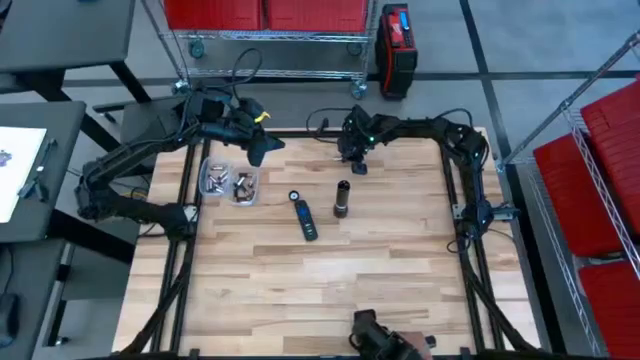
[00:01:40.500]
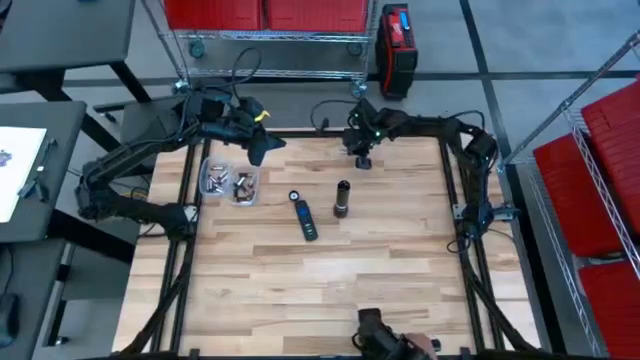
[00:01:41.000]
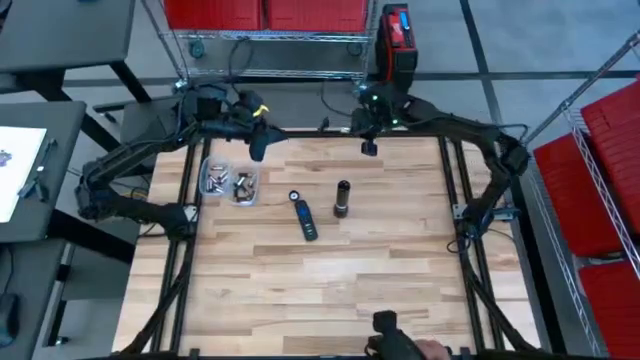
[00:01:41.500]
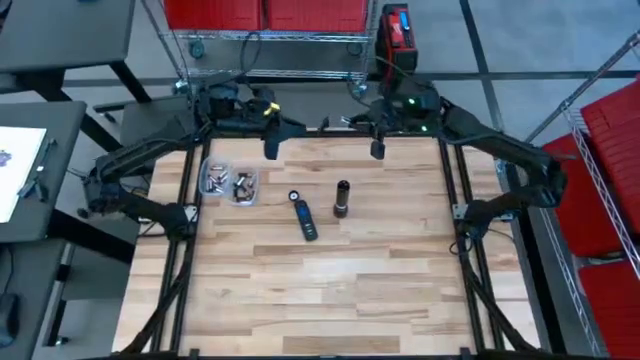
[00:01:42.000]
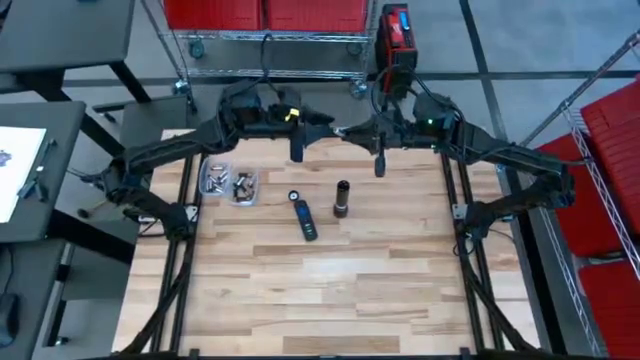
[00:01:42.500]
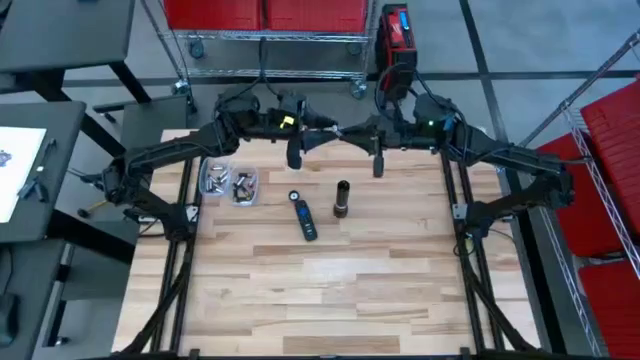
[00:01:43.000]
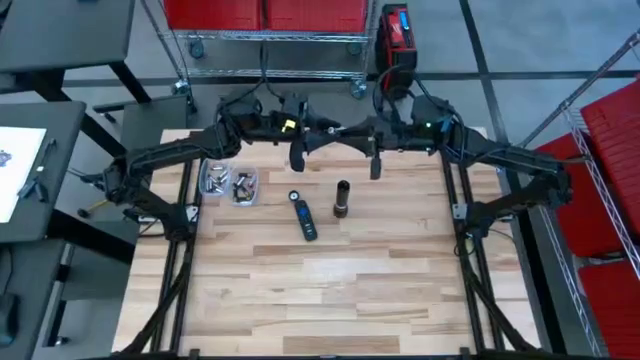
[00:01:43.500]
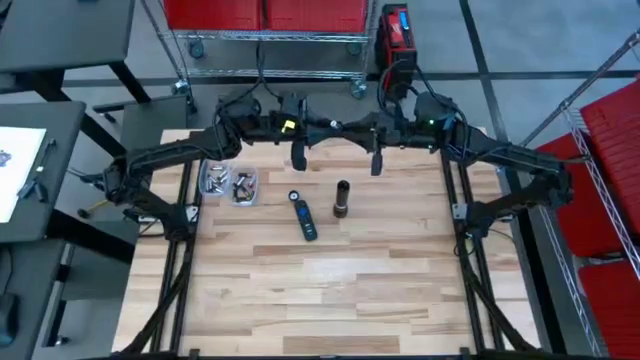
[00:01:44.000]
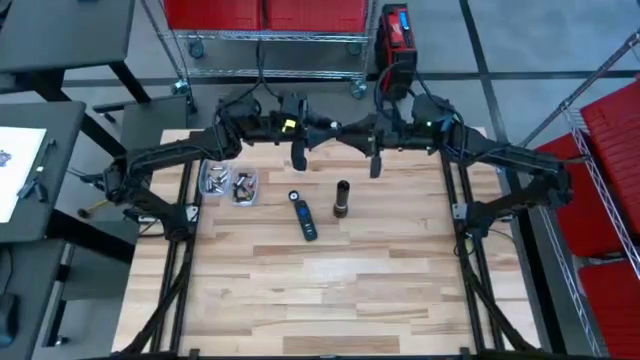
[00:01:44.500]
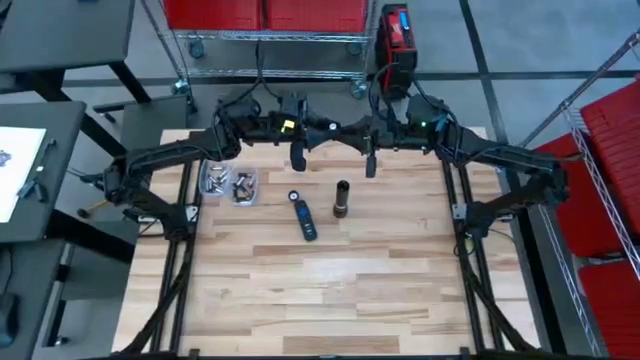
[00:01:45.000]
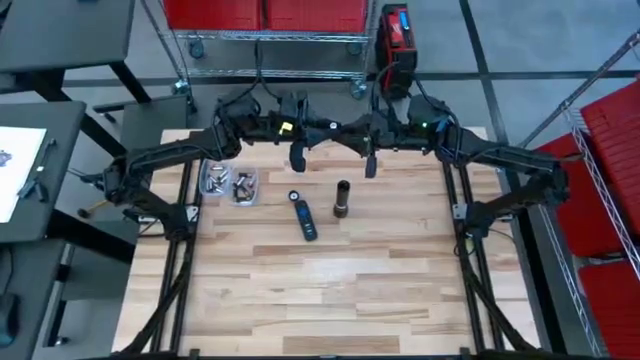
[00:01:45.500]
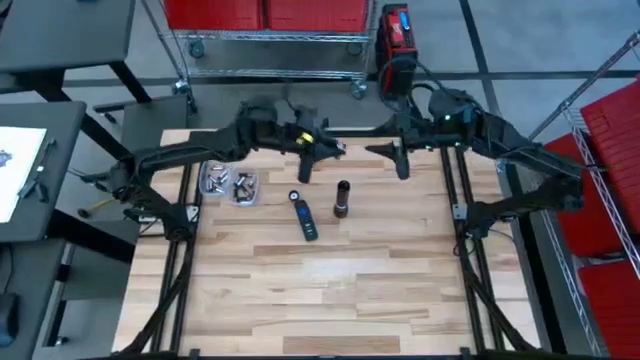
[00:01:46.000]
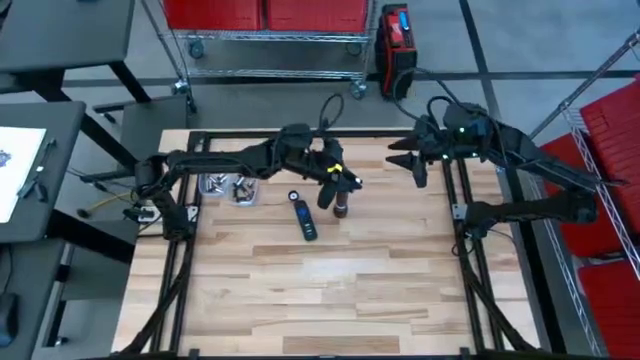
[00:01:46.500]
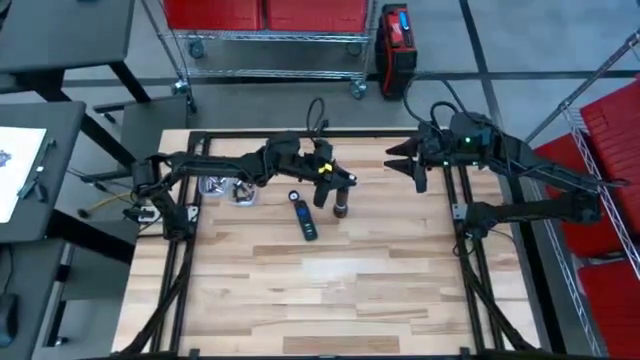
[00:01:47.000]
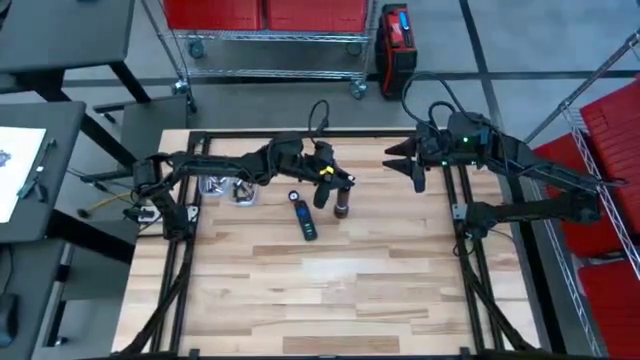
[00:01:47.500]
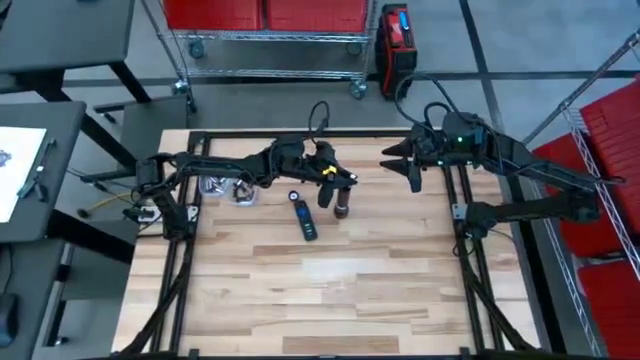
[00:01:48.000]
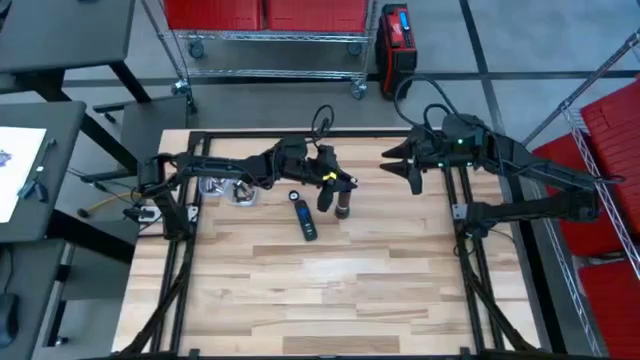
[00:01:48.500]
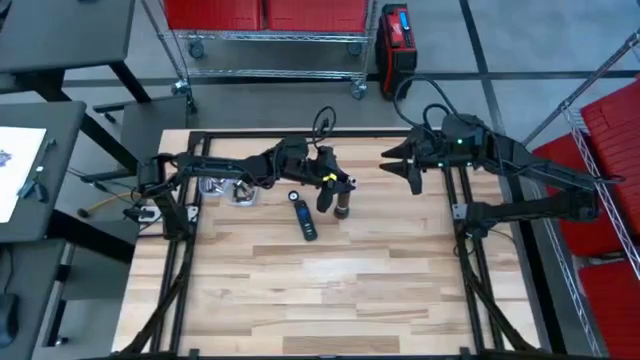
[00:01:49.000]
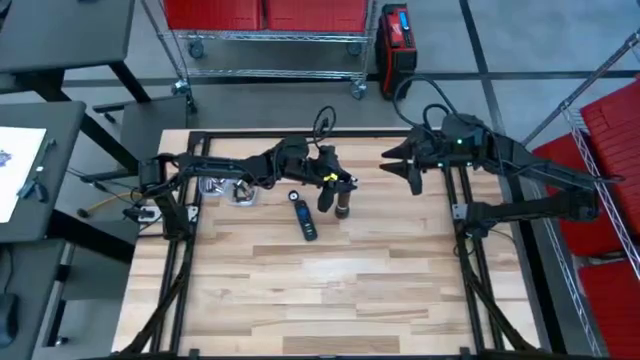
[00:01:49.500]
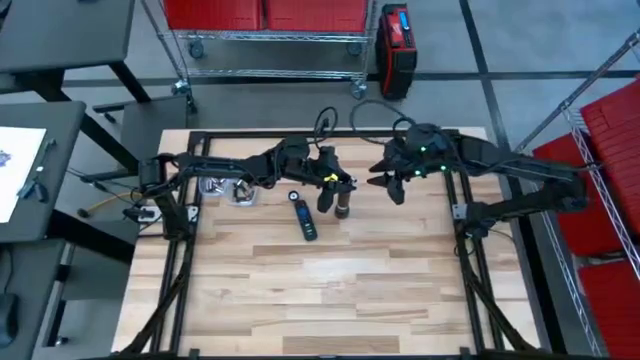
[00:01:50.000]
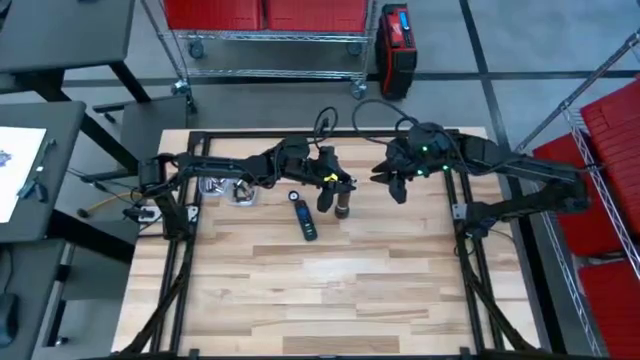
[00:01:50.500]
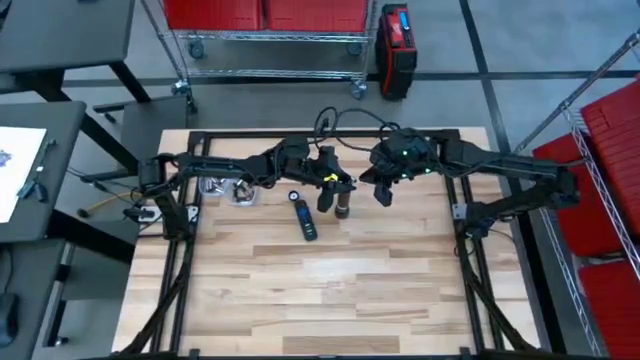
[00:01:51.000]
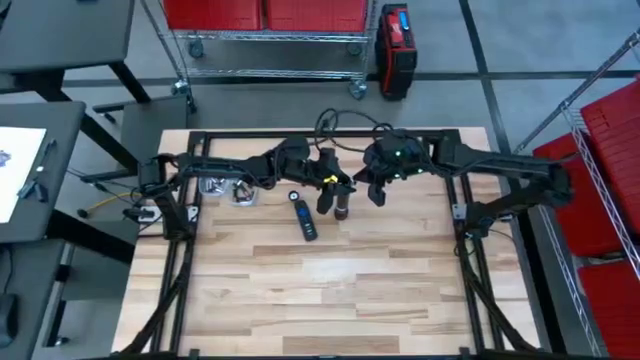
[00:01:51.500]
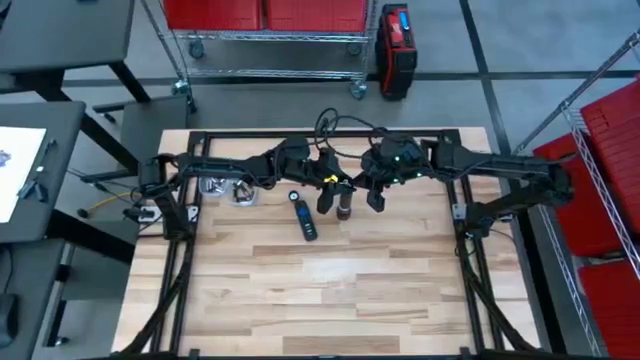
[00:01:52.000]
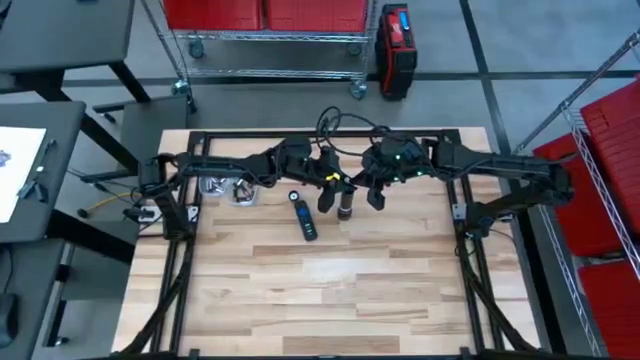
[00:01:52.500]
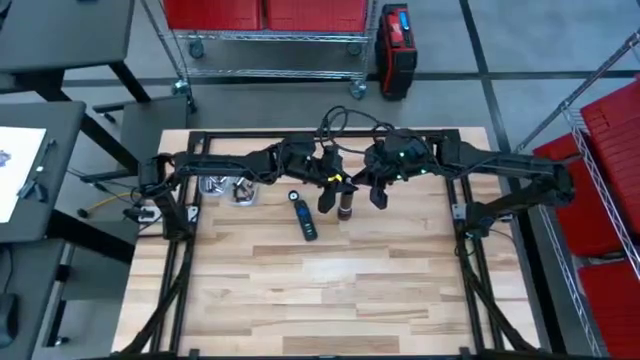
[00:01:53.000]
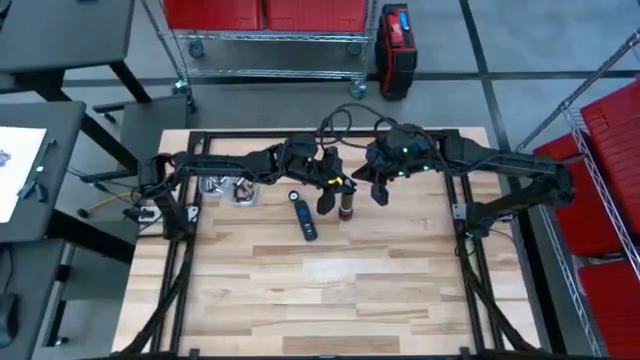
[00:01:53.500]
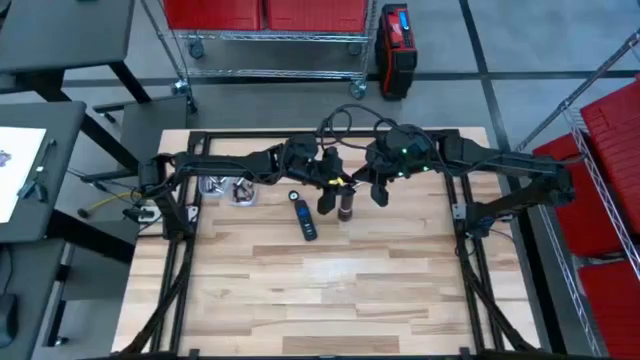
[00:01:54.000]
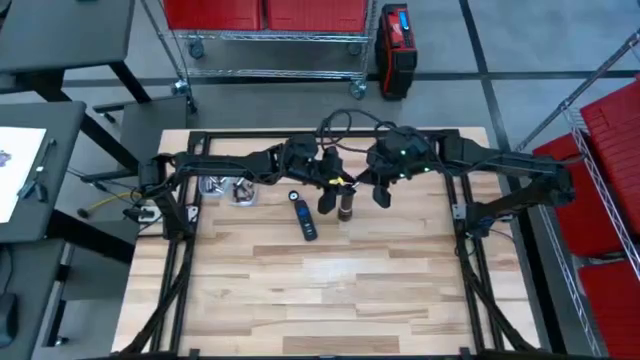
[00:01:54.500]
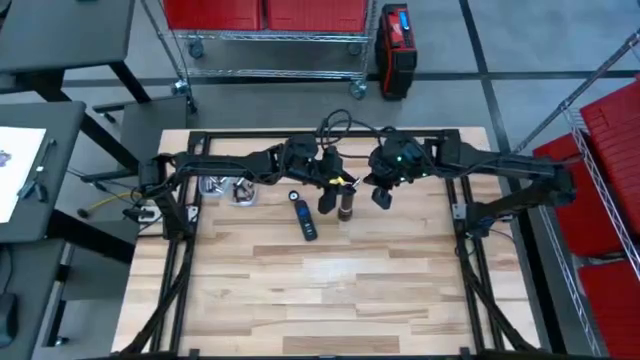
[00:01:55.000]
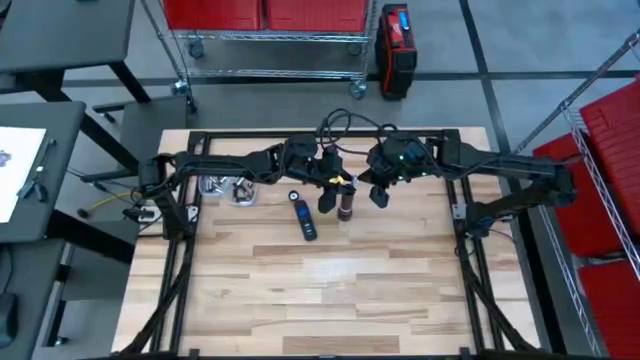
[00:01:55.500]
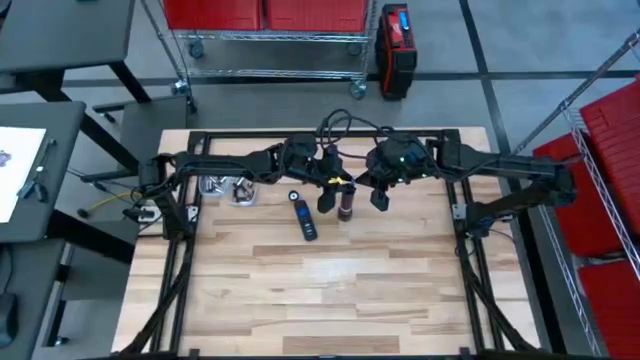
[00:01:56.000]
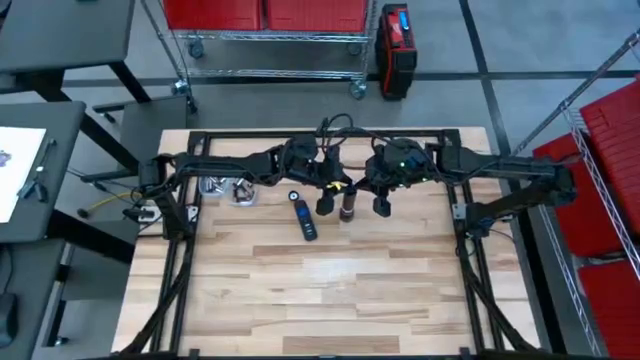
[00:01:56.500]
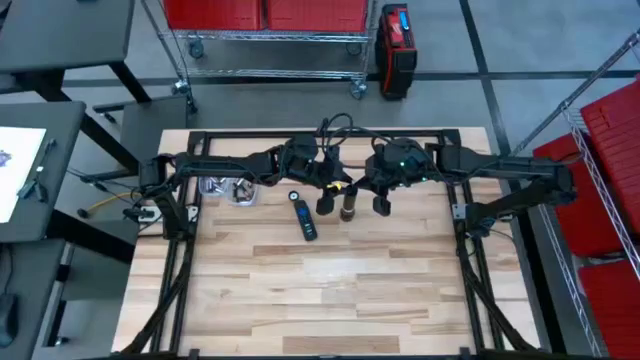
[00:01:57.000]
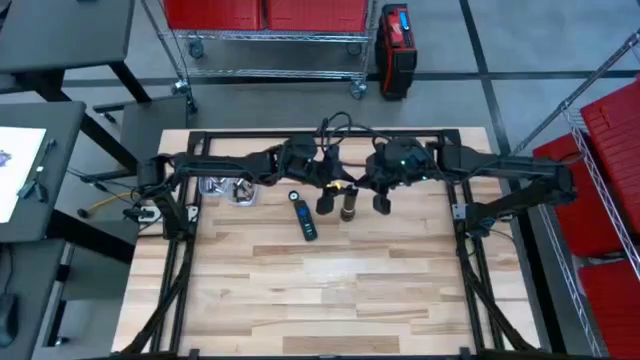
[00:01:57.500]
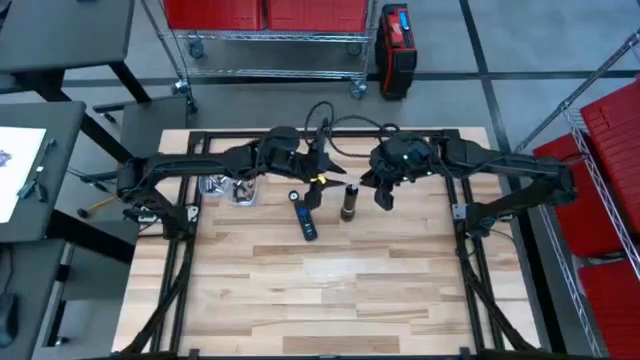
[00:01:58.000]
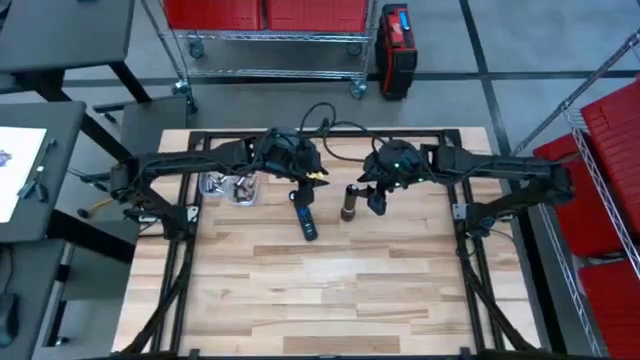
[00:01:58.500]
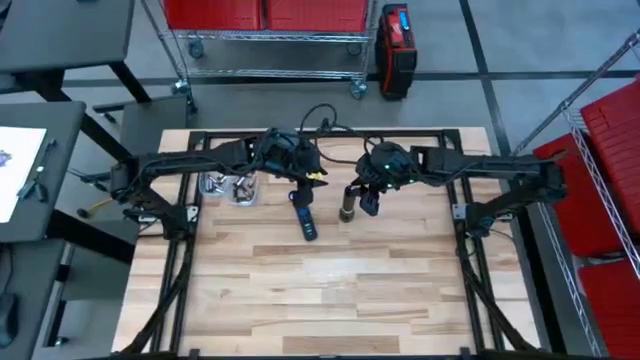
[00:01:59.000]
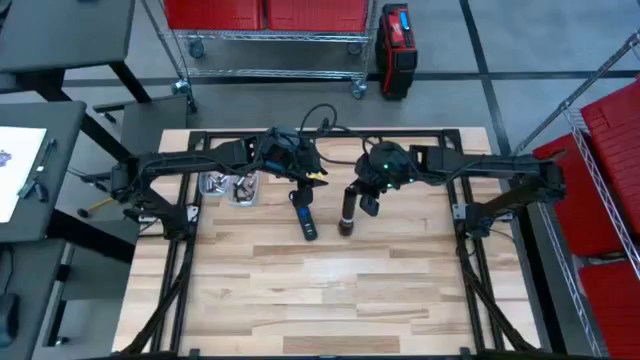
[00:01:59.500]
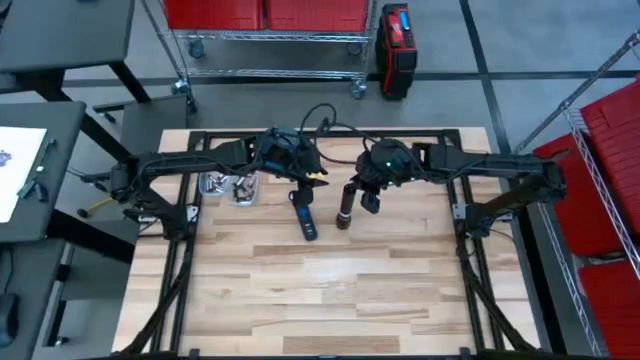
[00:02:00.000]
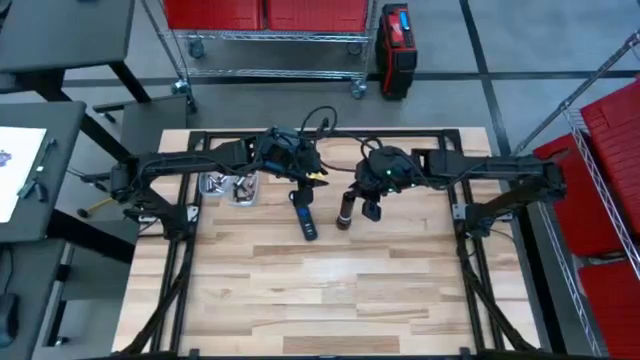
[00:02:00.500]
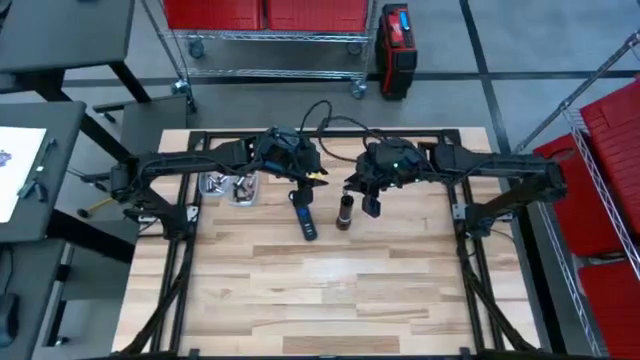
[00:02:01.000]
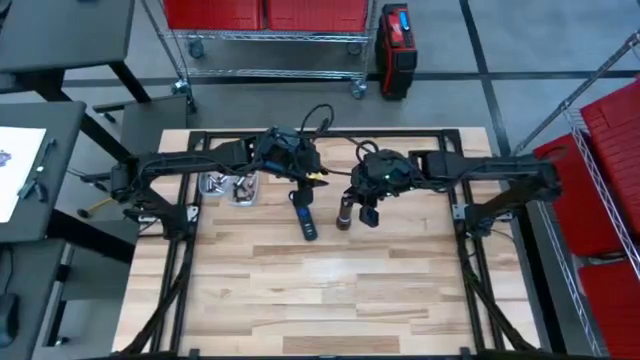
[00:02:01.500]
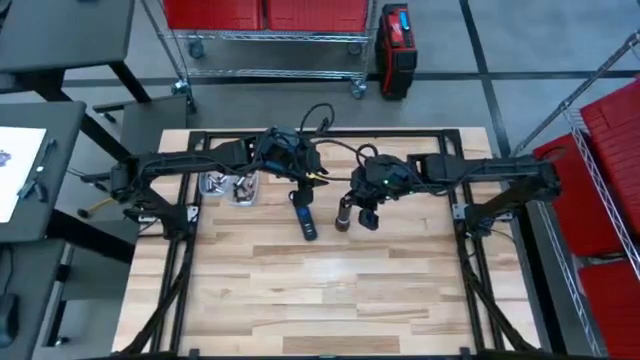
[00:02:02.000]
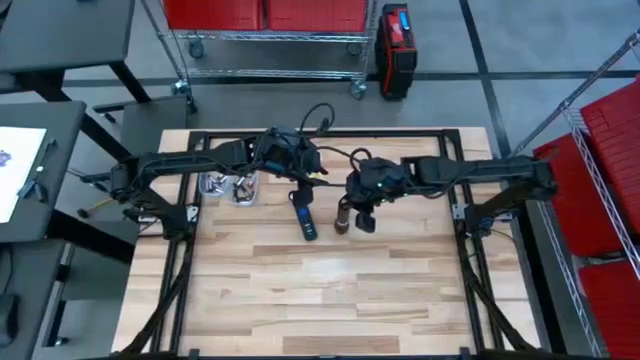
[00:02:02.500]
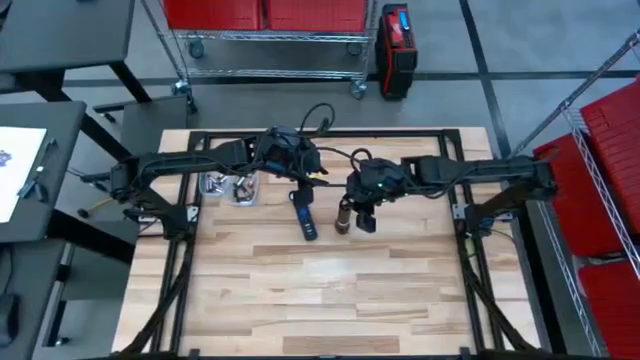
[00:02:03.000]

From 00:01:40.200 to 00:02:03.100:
Task: Insert battery
Insert the silver battery into the flashlight's battery compartment
